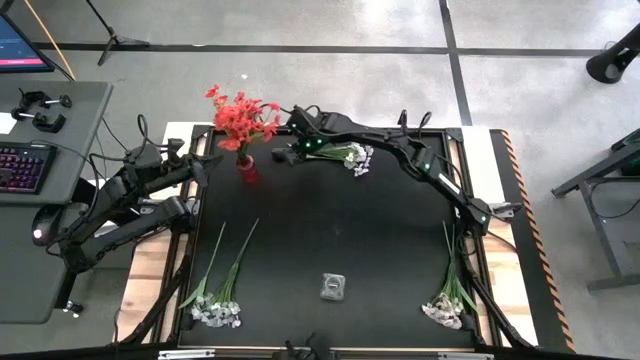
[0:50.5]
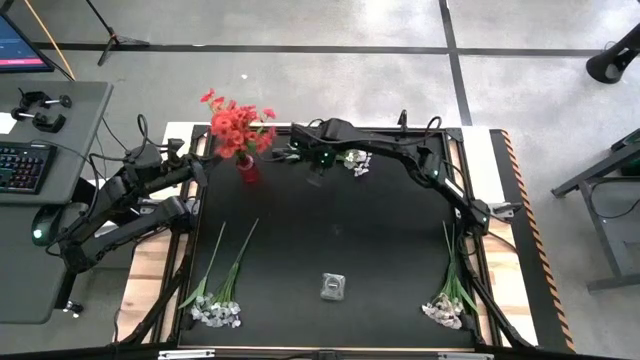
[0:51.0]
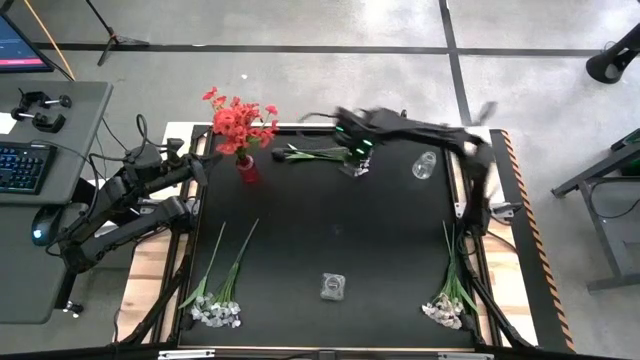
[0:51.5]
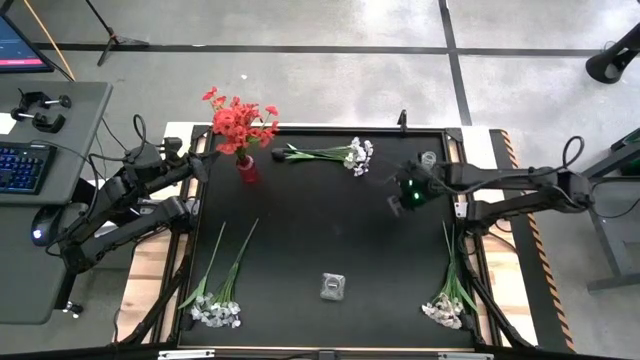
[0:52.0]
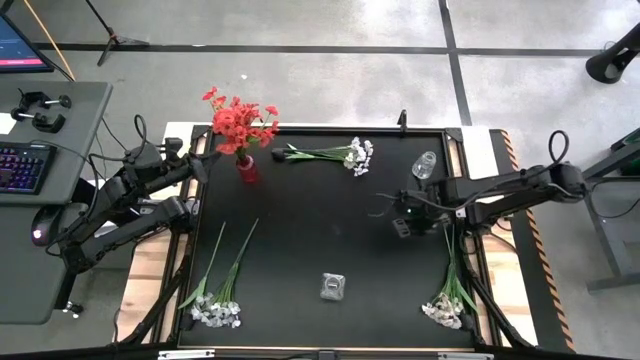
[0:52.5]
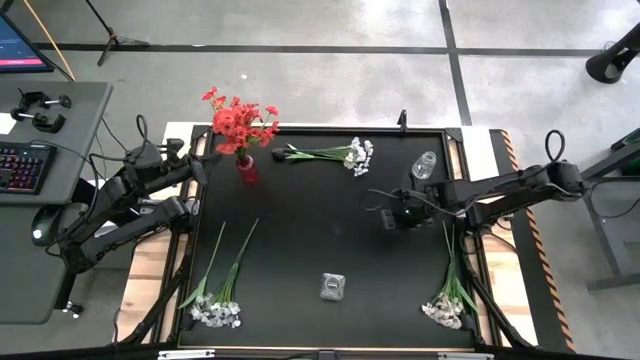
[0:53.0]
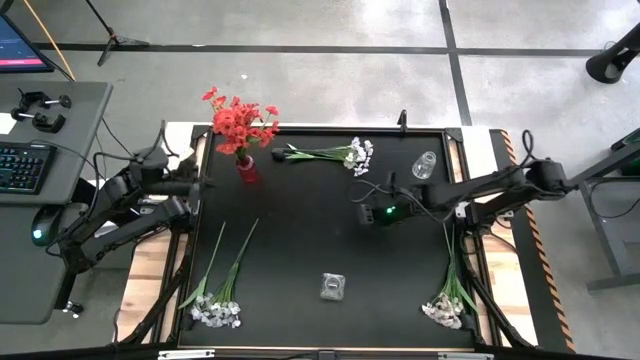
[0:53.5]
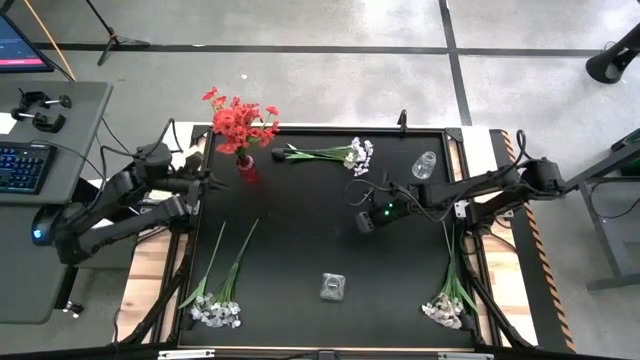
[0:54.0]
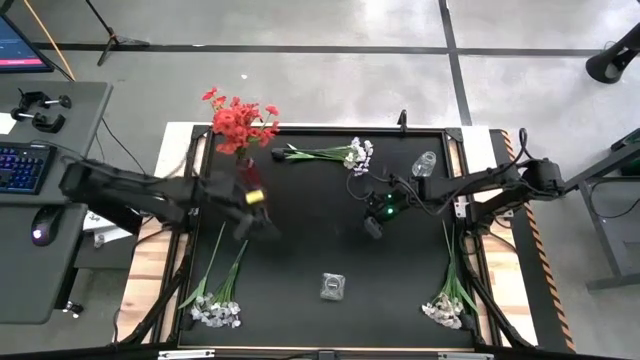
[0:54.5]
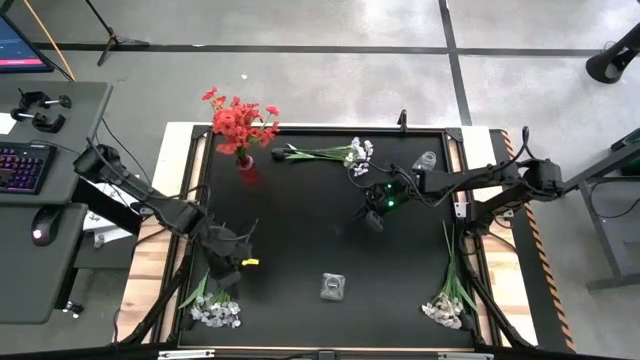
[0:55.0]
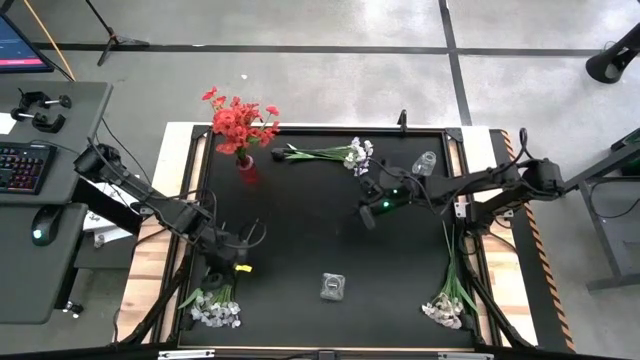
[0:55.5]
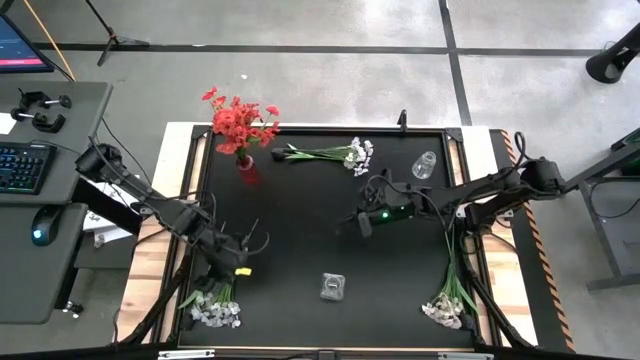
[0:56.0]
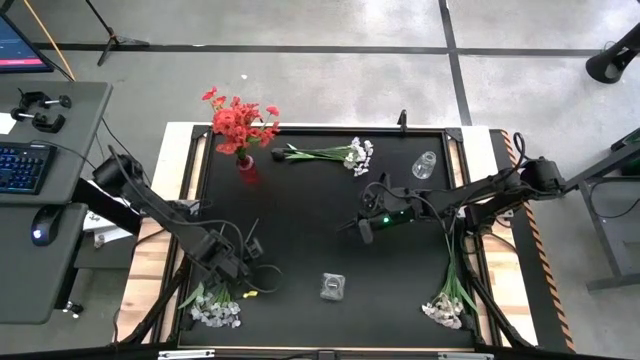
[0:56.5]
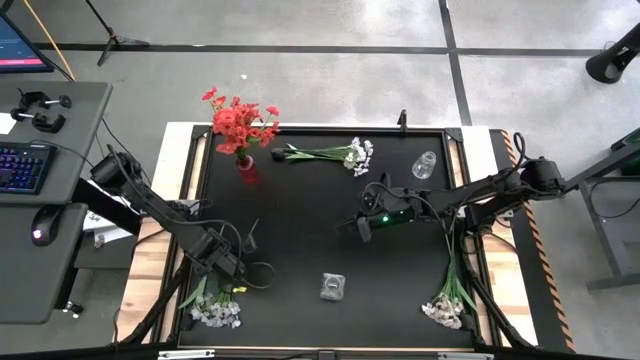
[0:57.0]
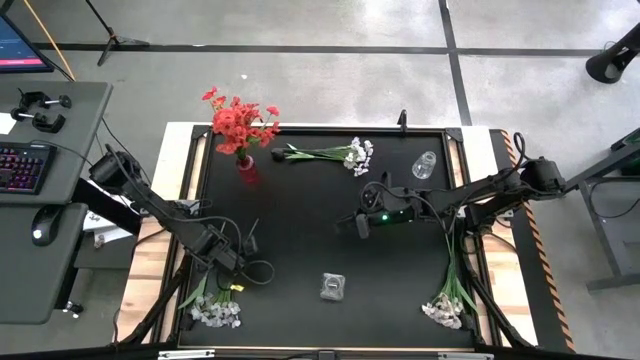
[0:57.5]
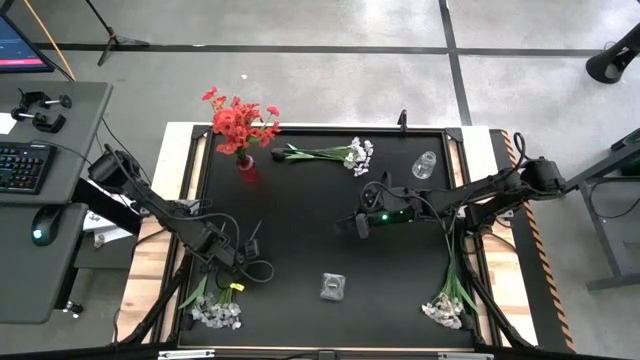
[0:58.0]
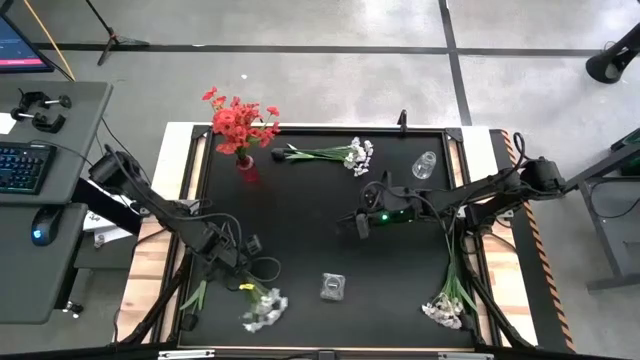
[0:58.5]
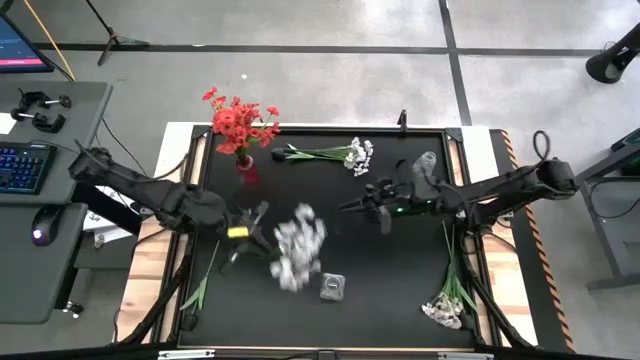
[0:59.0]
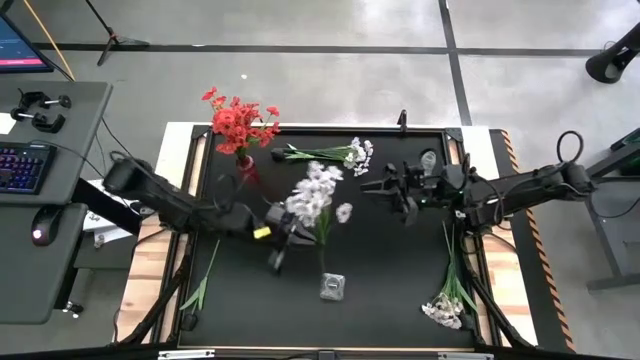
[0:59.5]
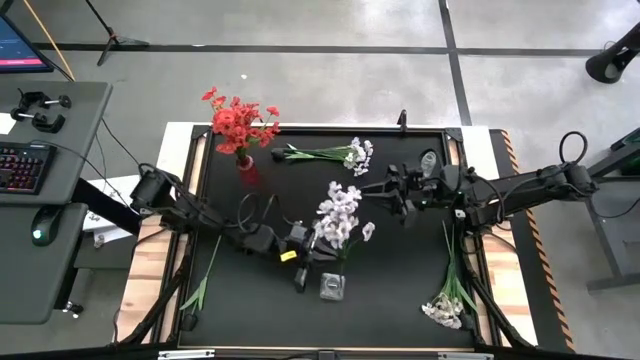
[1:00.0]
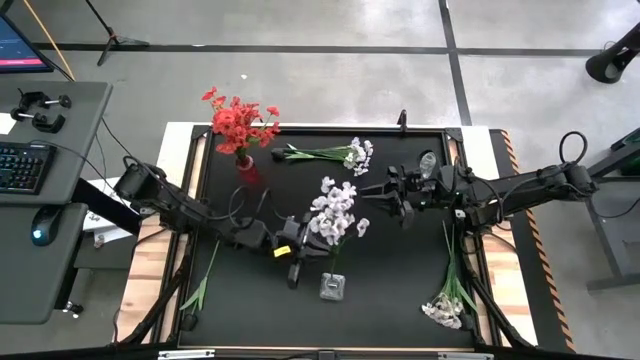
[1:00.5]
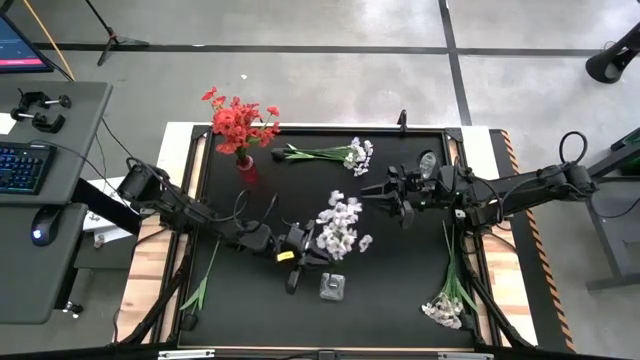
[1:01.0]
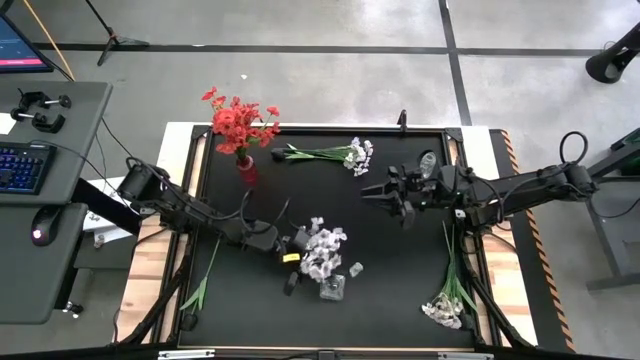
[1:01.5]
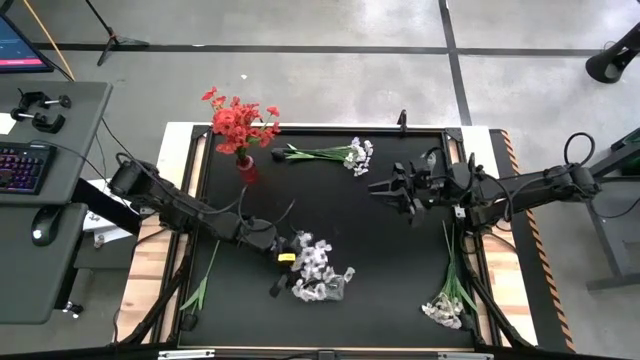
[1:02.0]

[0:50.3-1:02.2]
Task: Sort flowers into vase by color
Put the bottom left white flowers into the bottom transparent vase

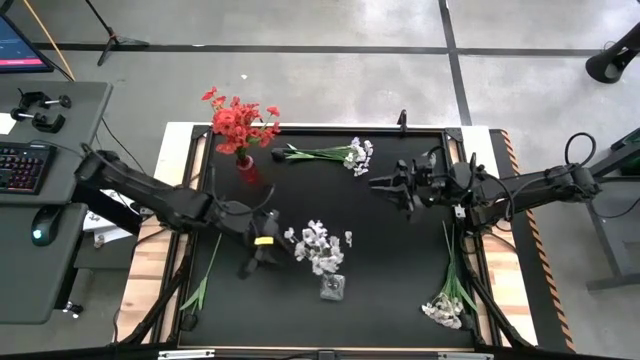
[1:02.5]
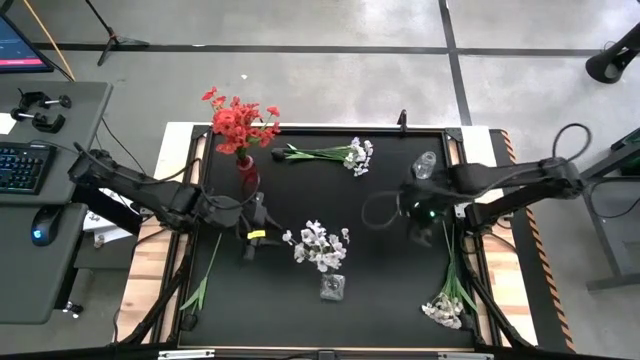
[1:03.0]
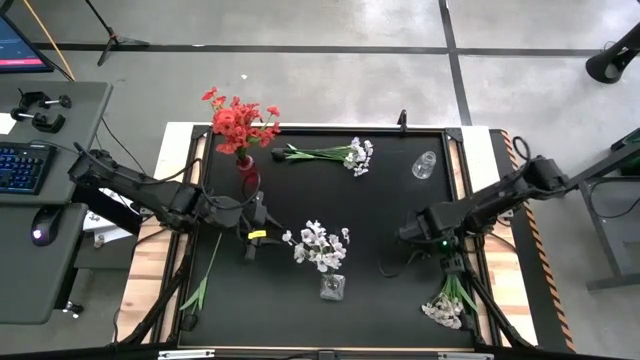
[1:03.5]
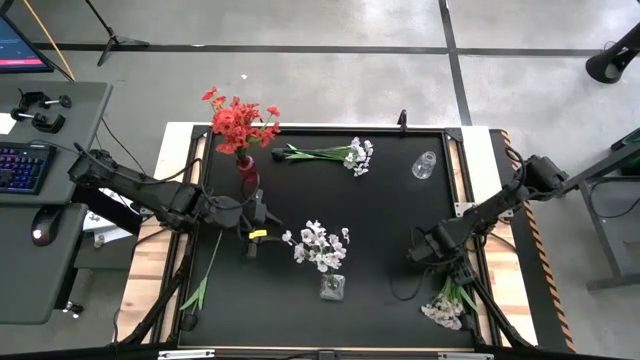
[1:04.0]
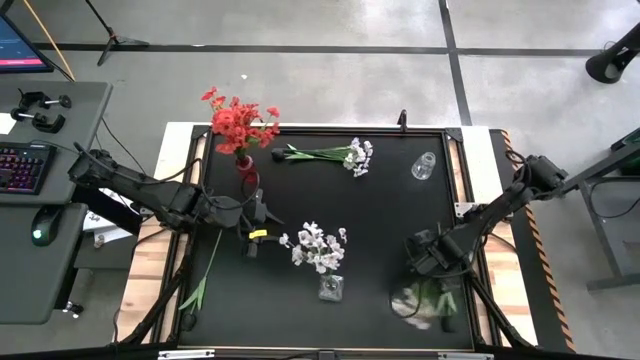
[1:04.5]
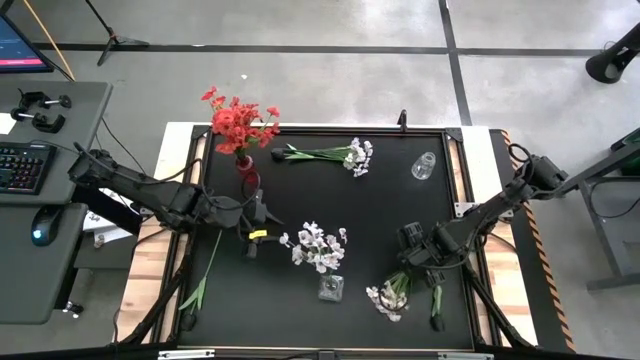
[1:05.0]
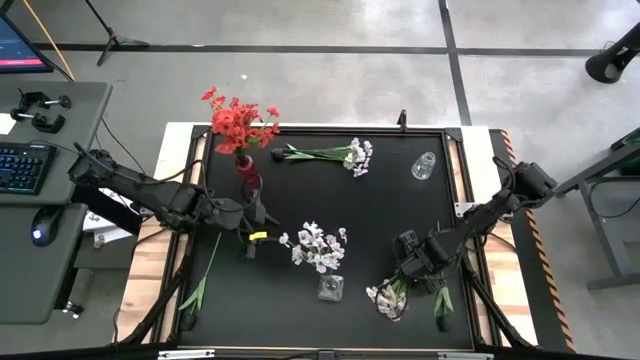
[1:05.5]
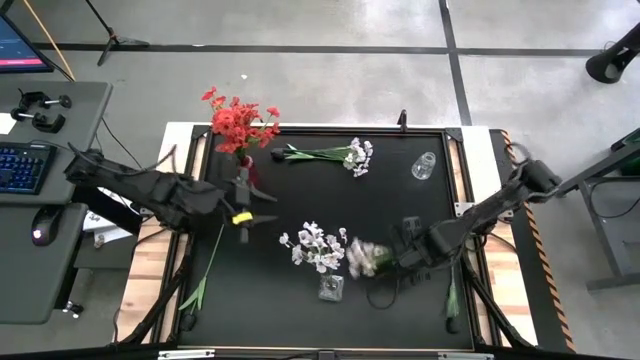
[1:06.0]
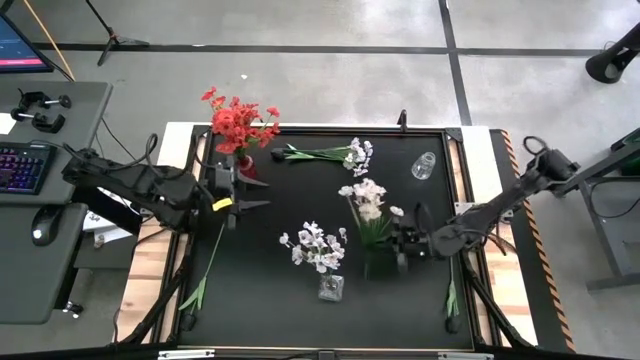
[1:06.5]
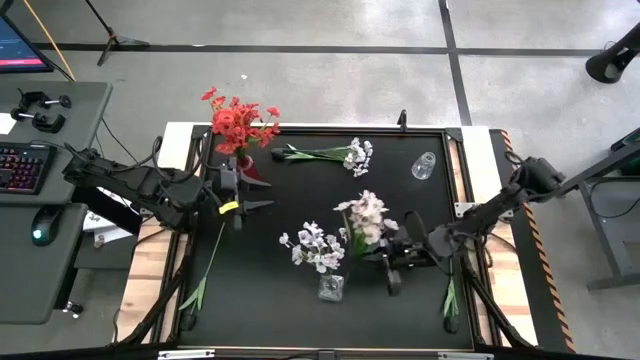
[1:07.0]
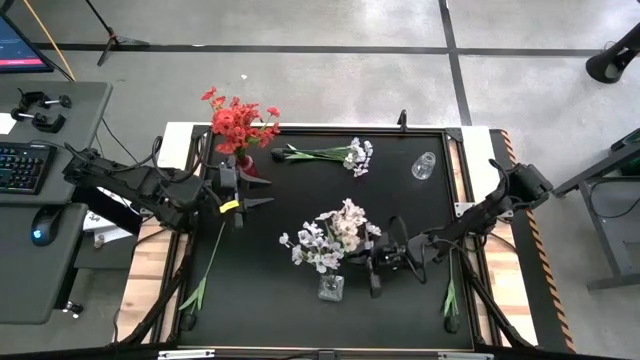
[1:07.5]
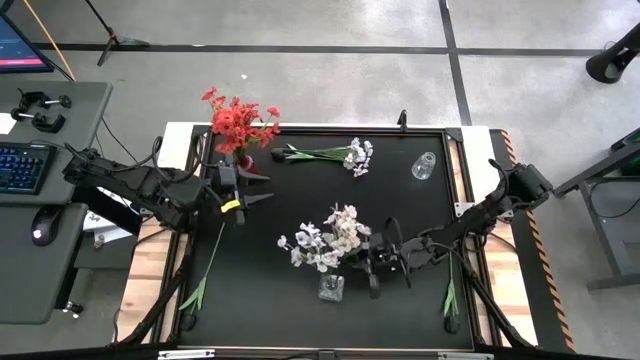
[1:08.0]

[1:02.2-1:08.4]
Put the bottom white flowers into the bottom transparent vase

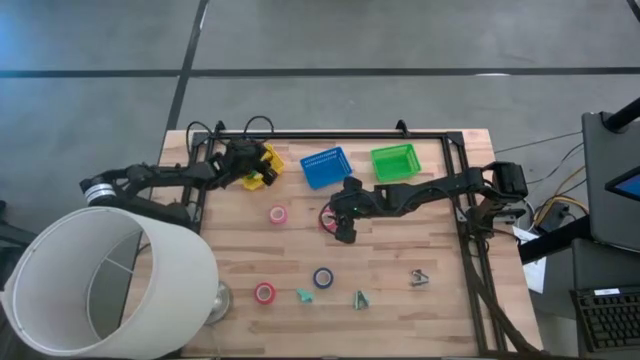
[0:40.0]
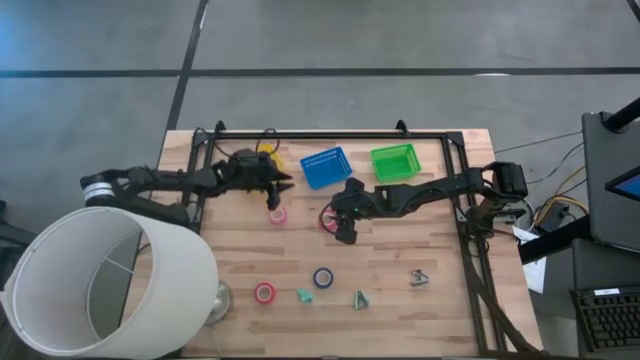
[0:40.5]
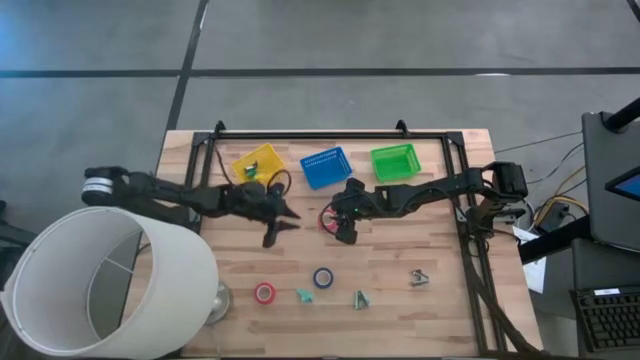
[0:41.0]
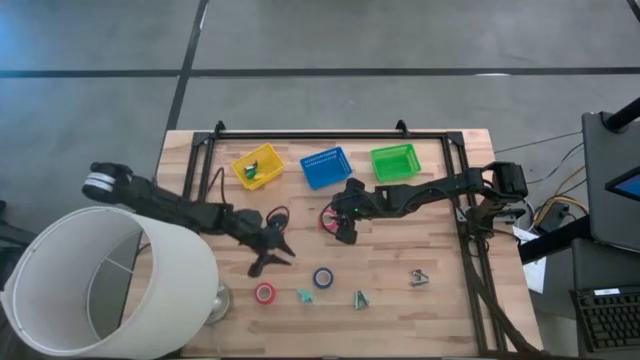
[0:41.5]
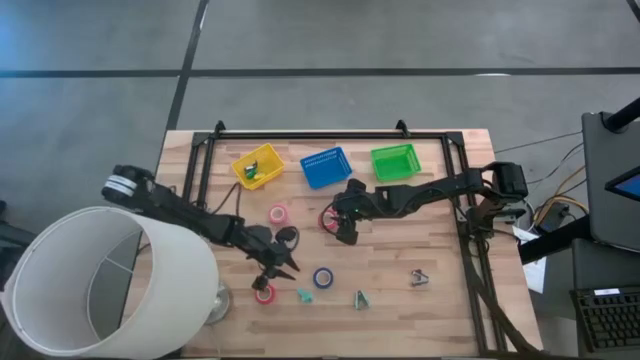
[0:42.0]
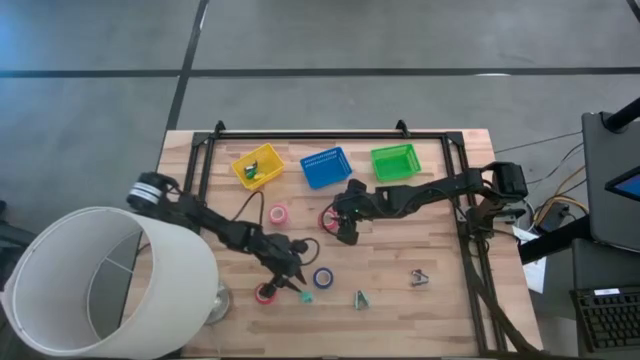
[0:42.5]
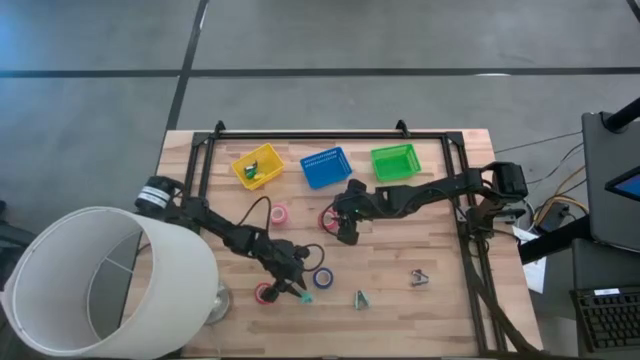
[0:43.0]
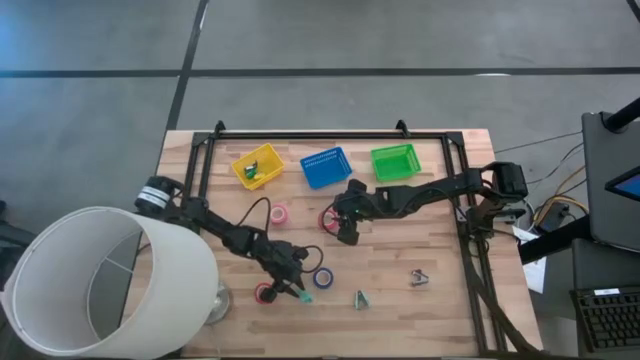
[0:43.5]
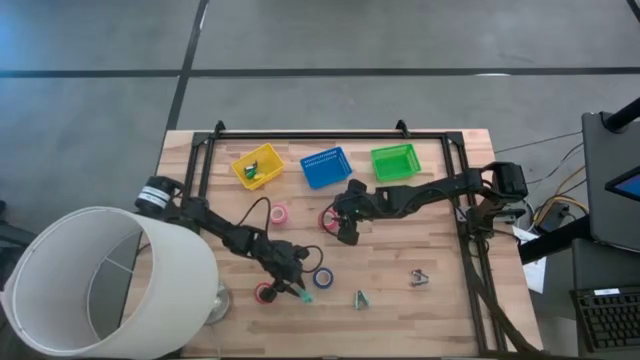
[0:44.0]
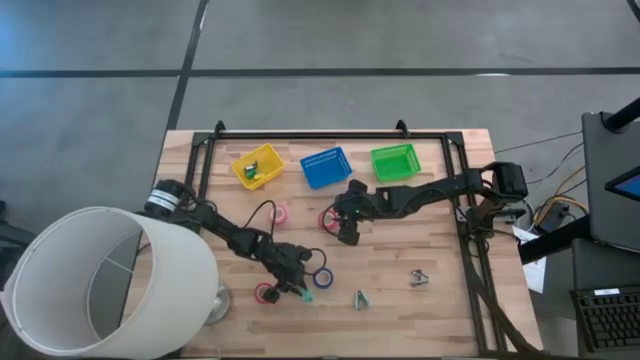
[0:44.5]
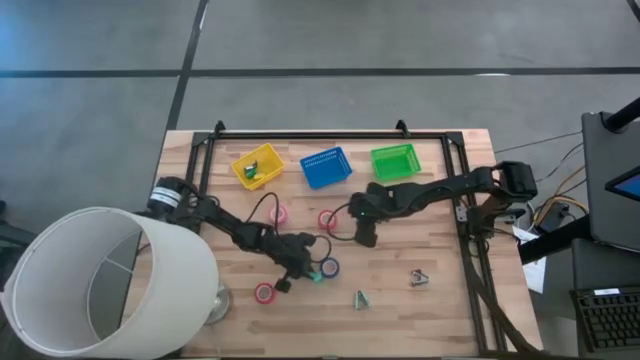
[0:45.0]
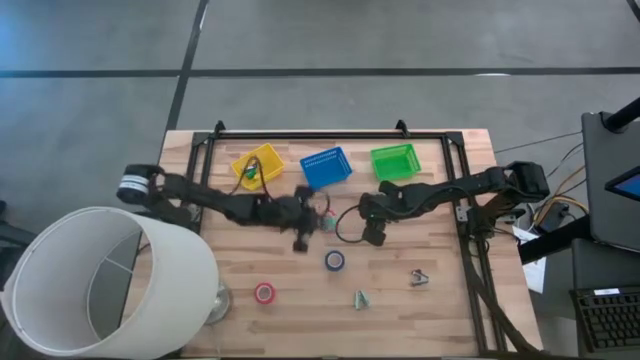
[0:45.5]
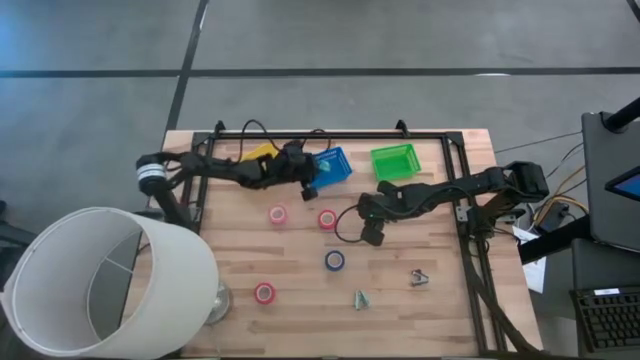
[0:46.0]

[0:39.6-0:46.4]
Task: Pick and place Stapler, Stapler remover, tape
Put the left light blue staple remover into the blue basket
